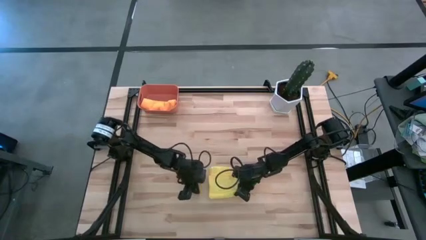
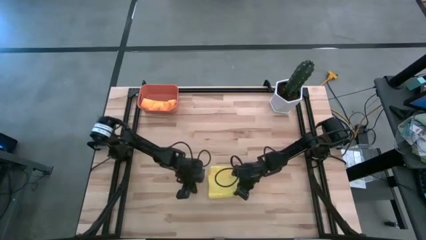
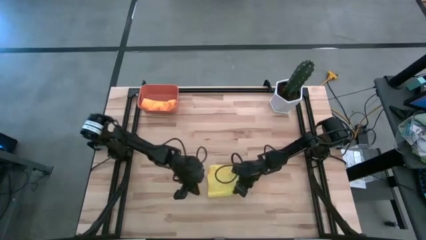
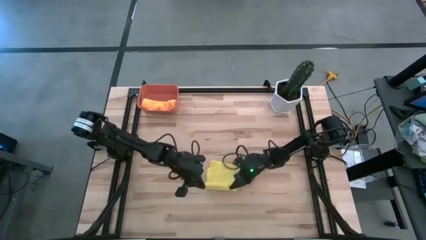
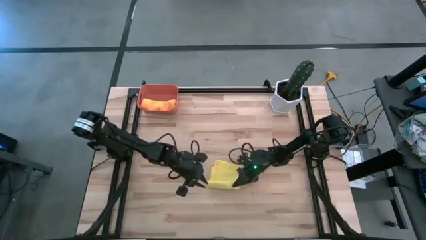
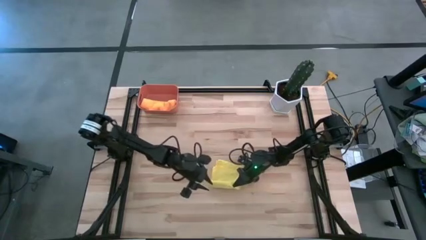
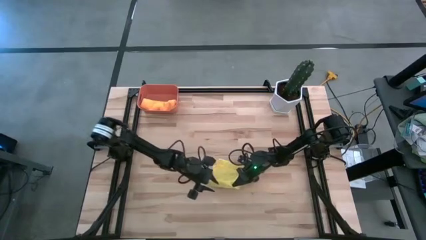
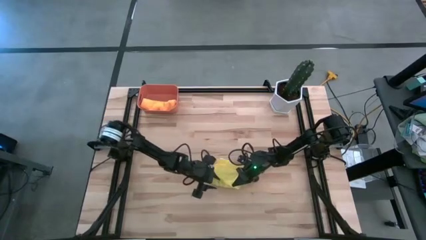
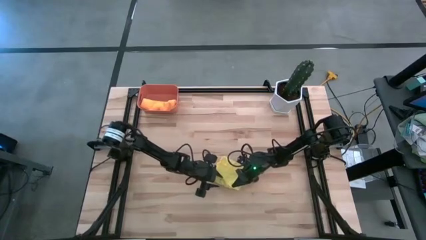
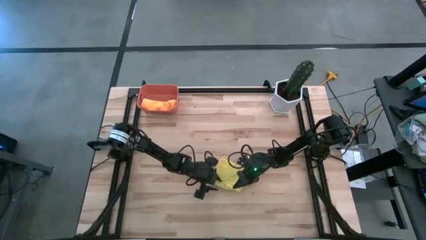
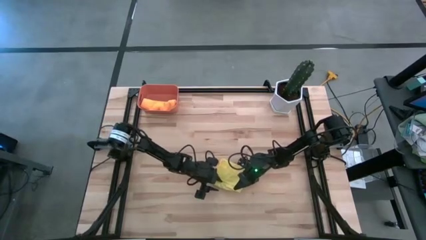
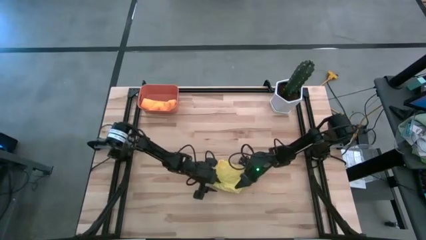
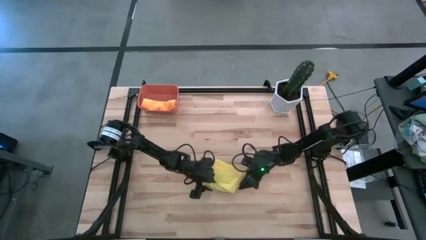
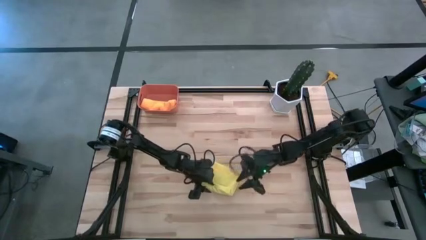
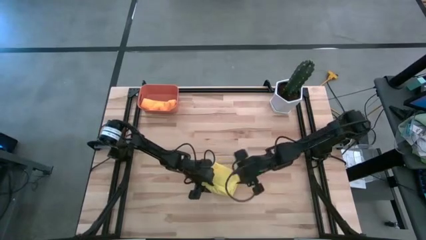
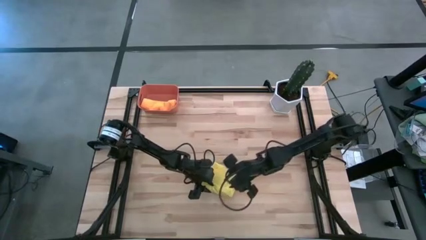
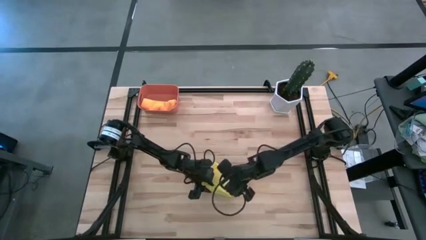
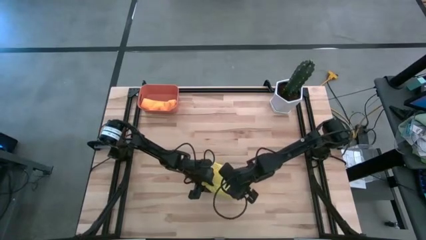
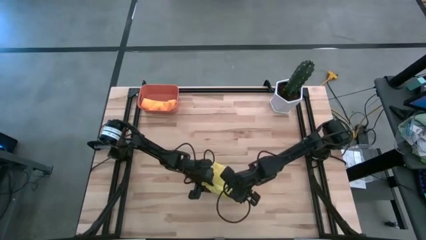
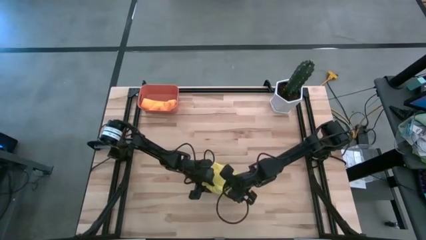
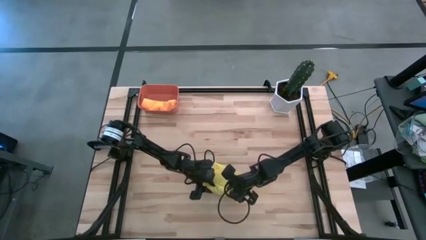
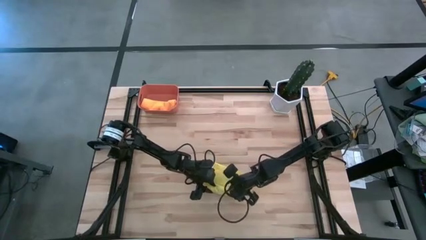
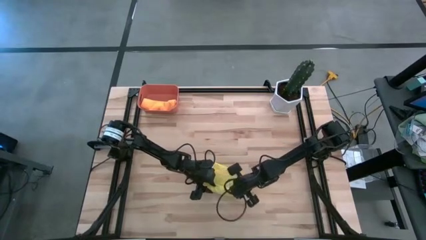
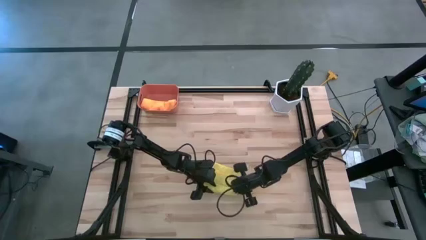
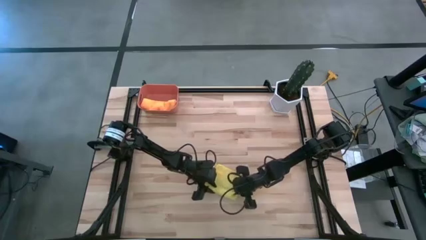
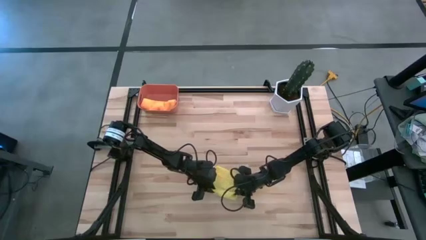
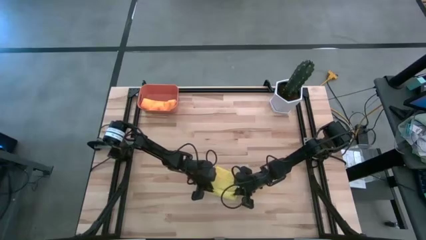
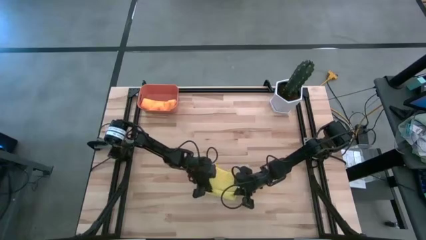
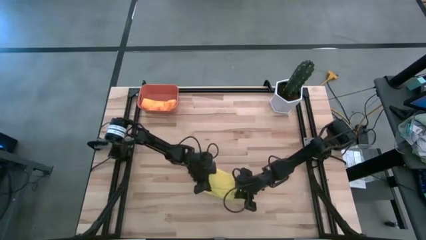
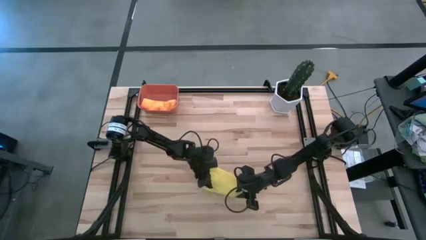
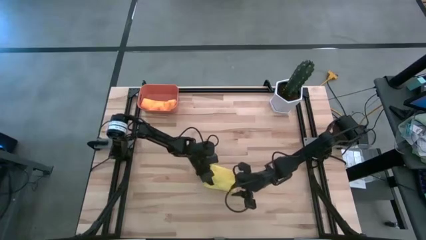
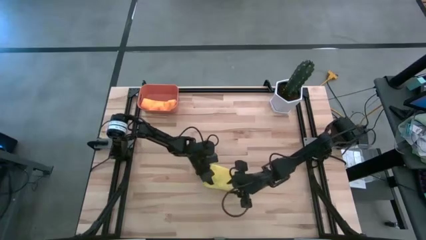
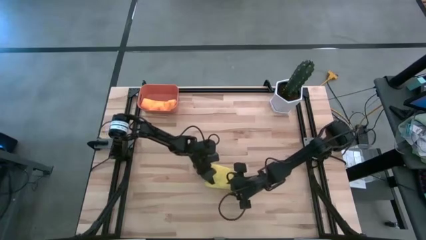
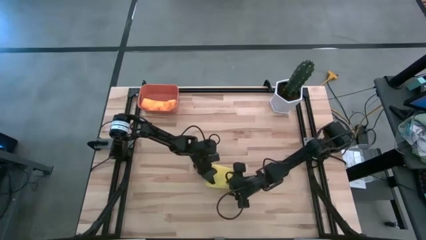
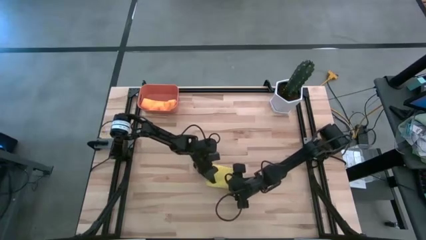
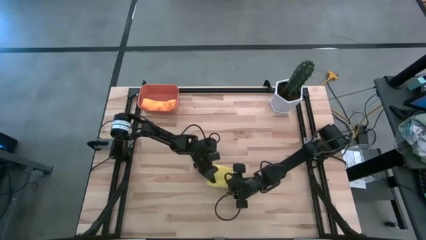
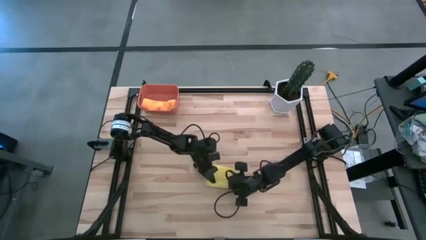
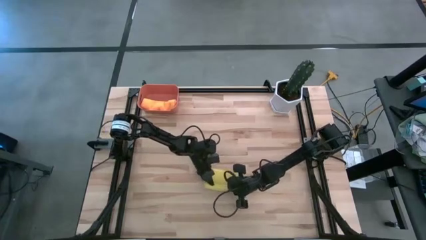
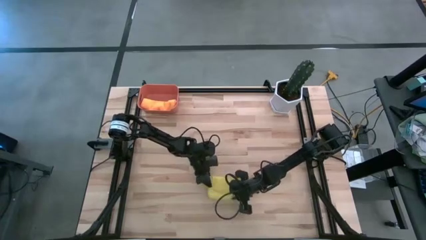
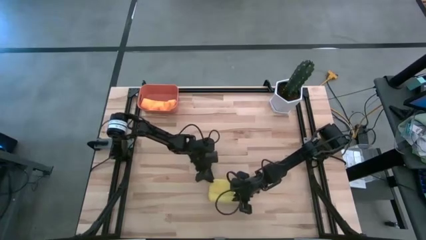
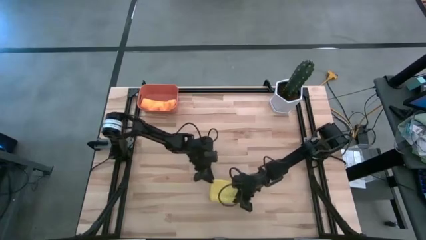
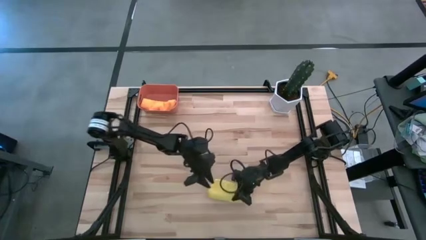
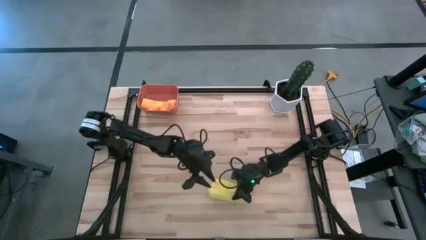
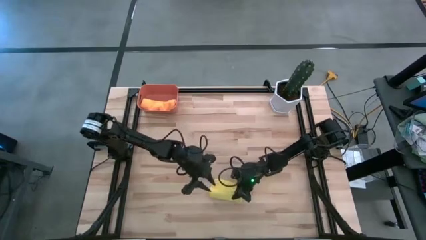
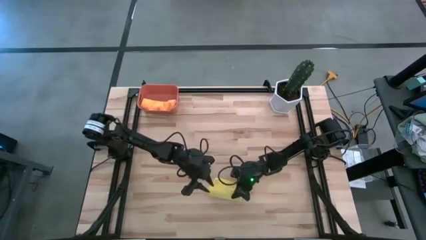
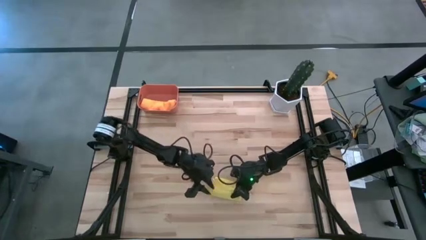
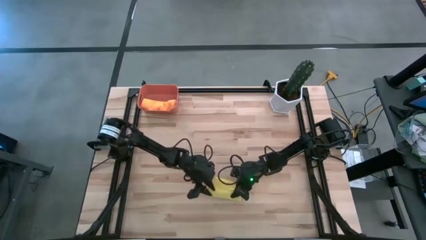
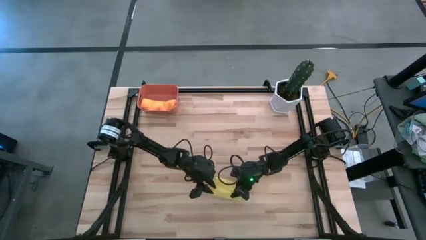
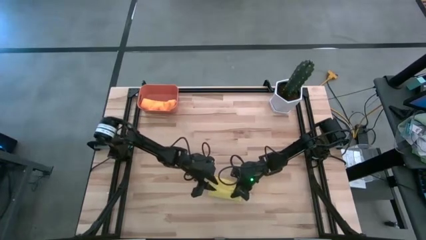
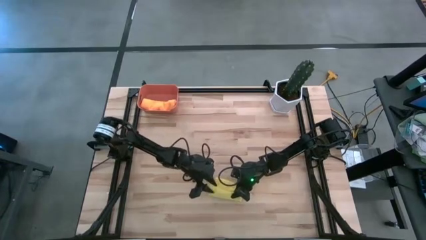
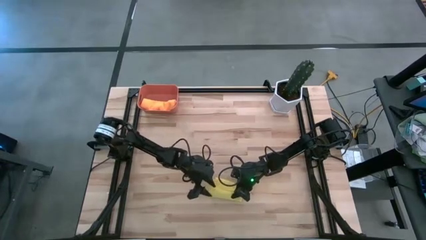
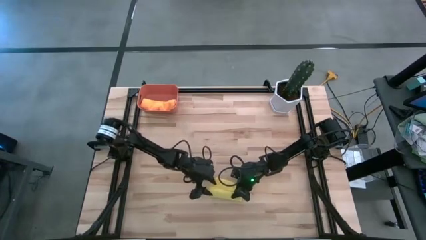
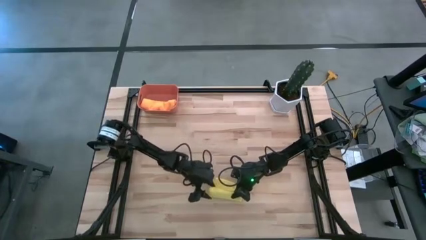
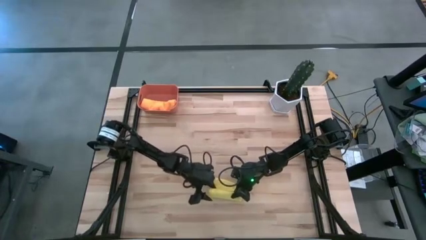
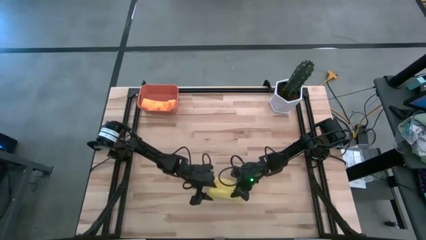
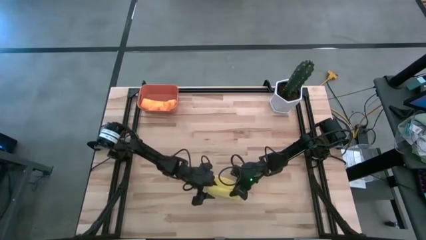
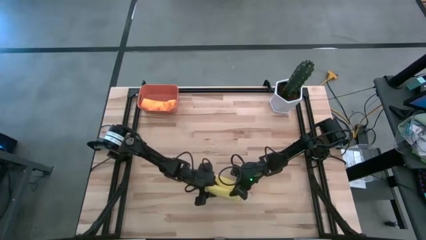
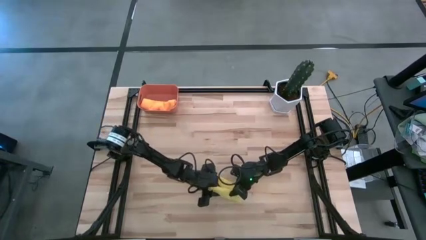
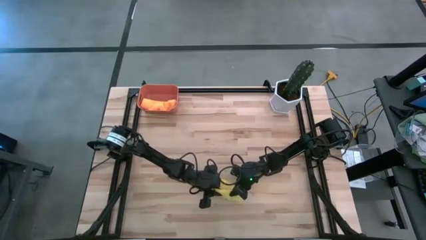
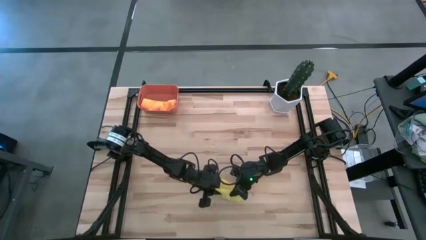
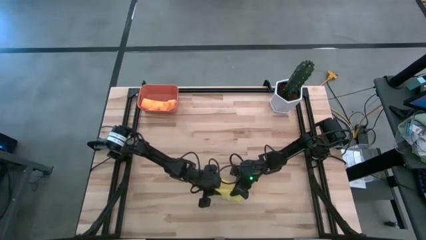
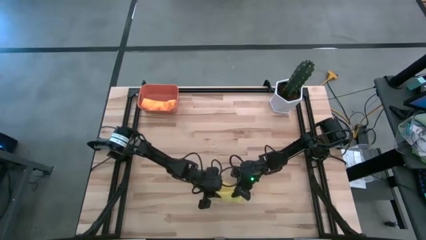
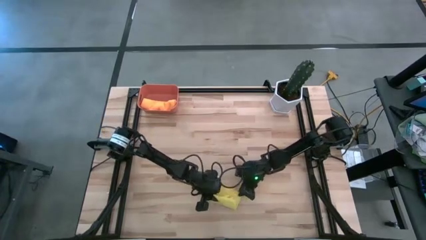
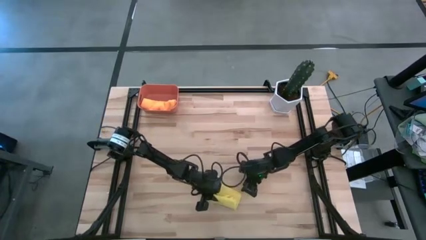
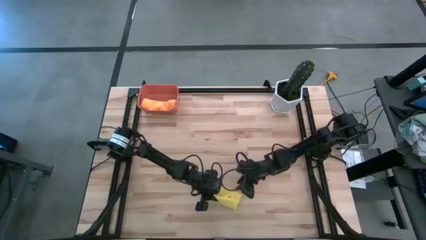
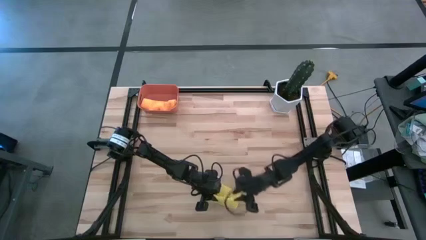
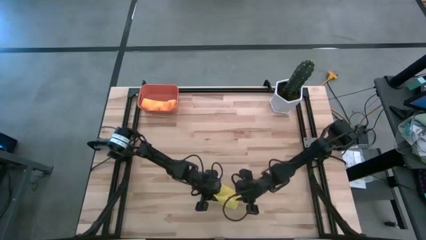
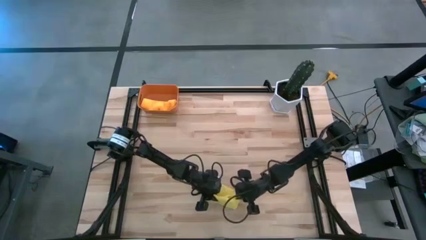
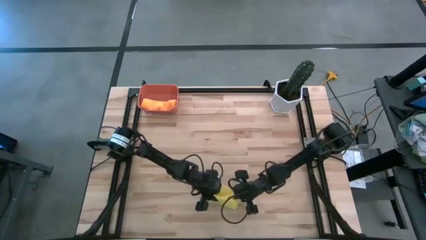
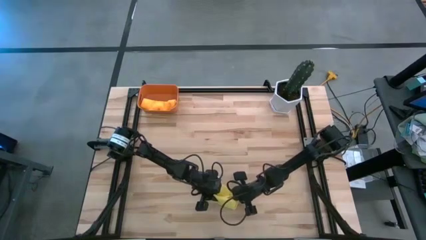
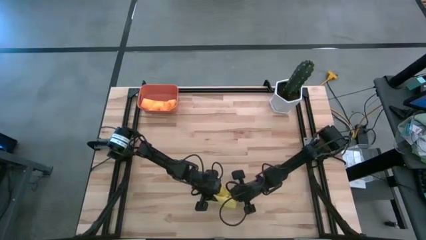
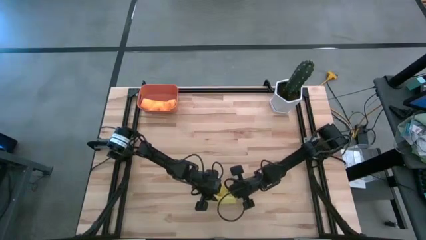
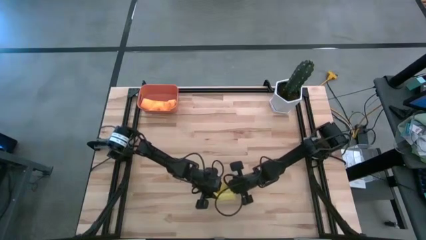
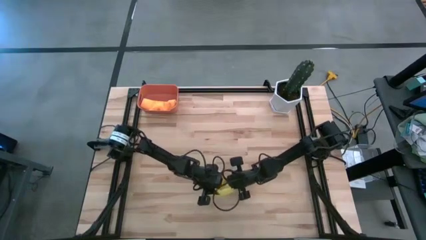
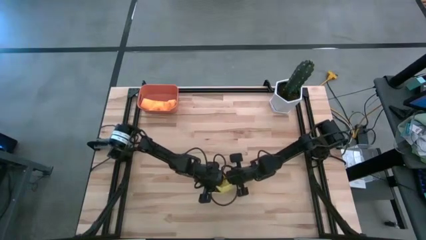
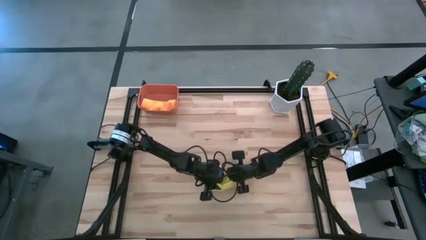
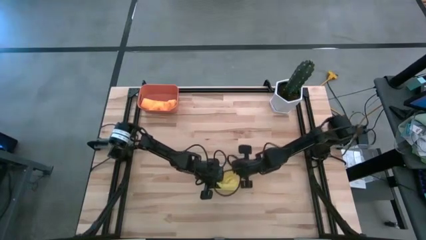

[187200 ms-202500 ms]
Task: Roll microfiber towels into tight, uniform cylinder then place into a basket
Roll the yellow towel
